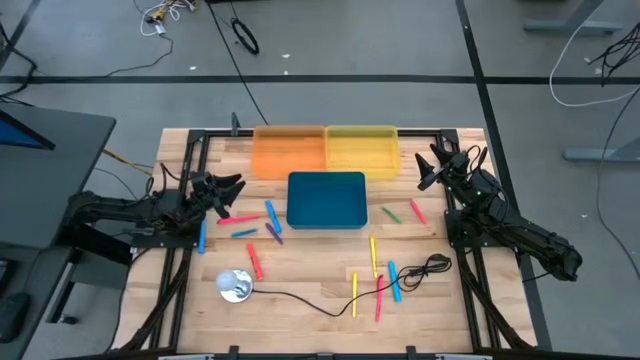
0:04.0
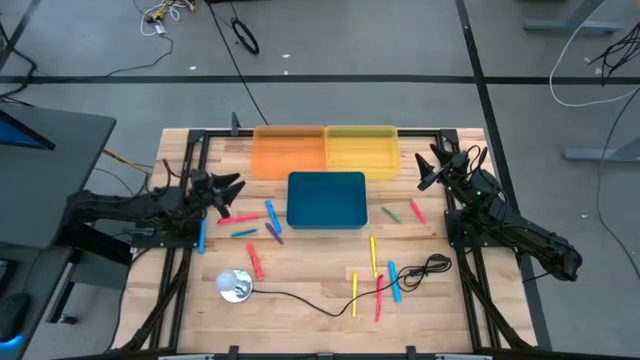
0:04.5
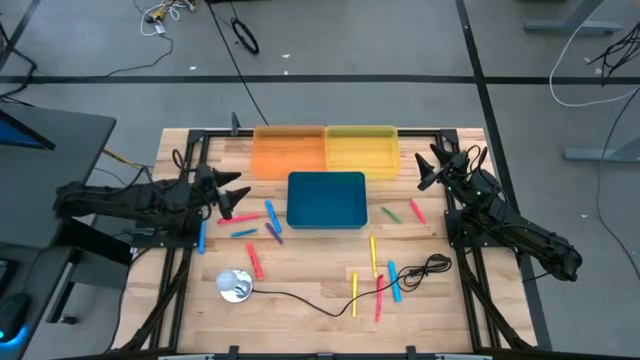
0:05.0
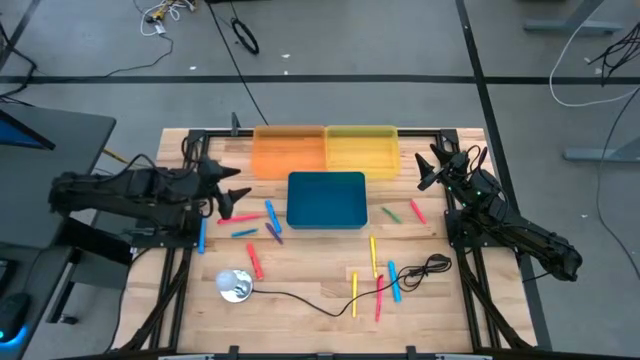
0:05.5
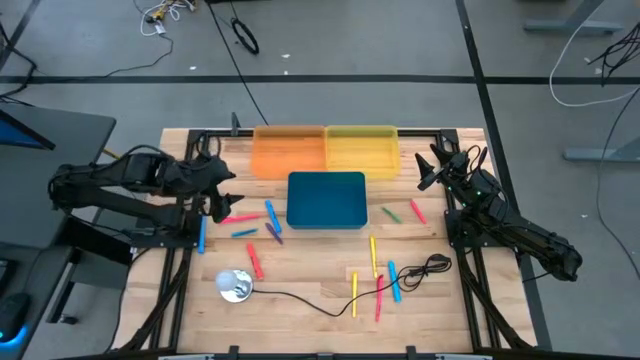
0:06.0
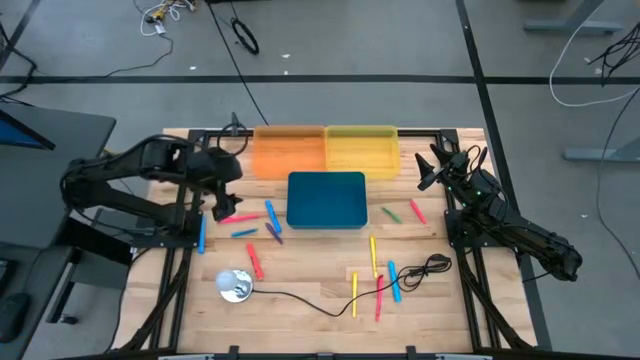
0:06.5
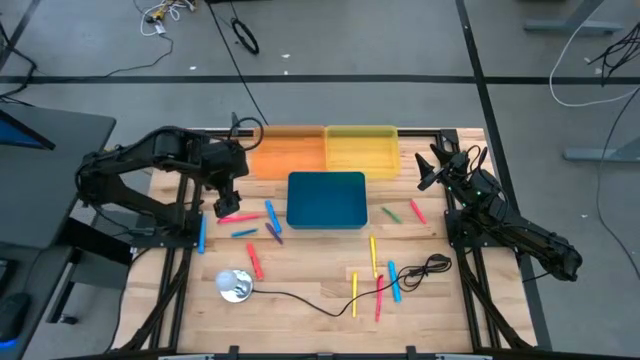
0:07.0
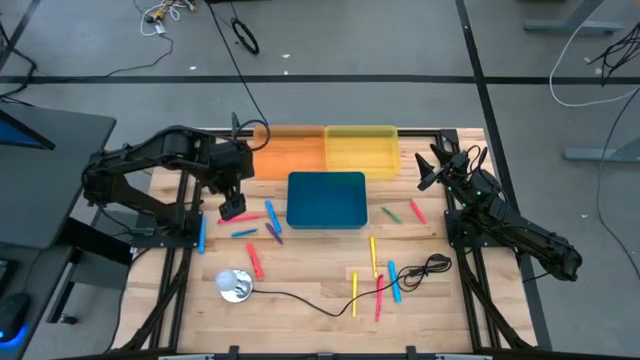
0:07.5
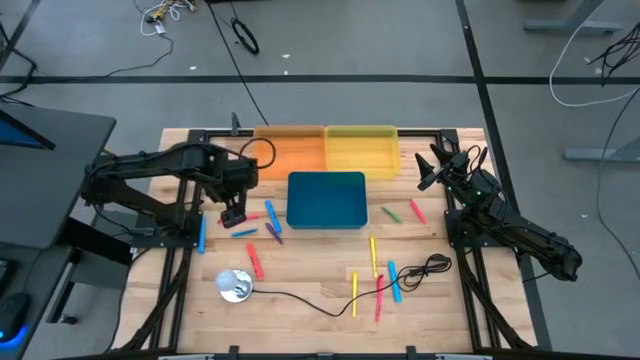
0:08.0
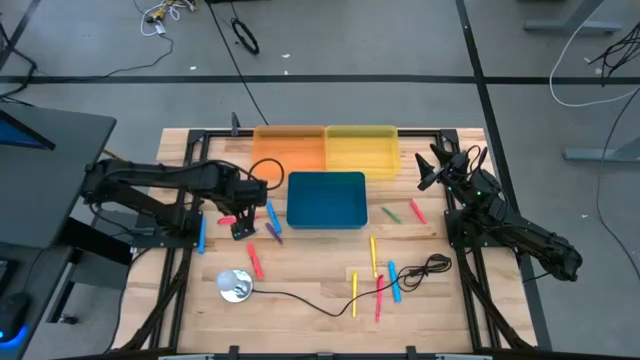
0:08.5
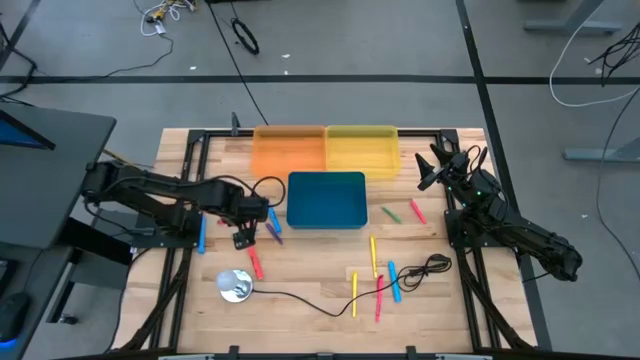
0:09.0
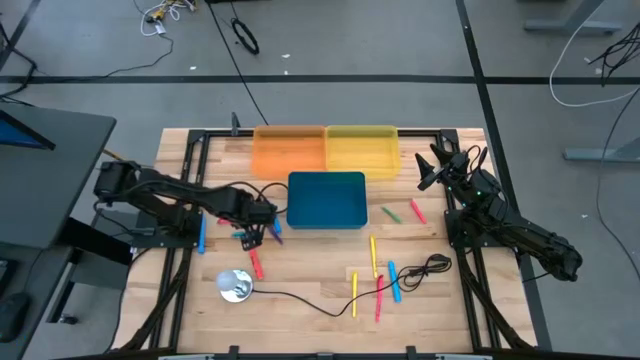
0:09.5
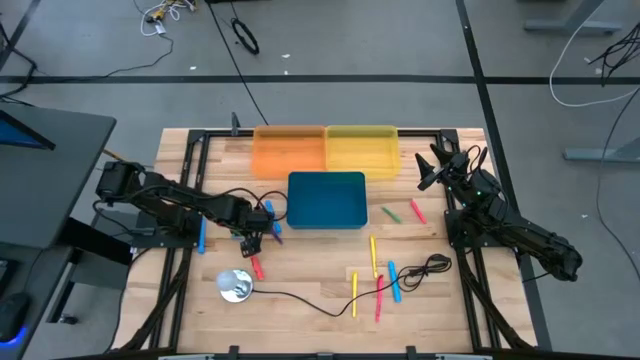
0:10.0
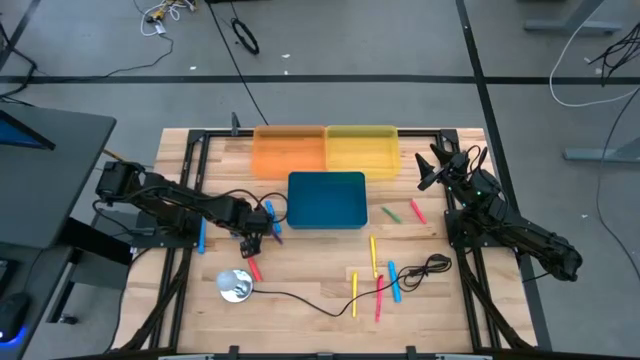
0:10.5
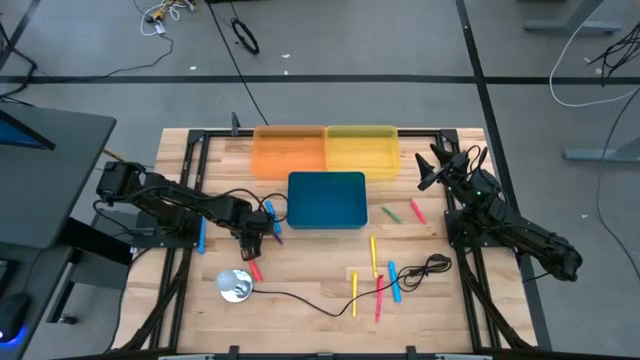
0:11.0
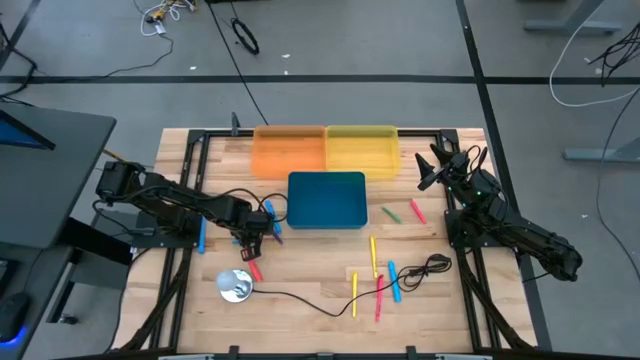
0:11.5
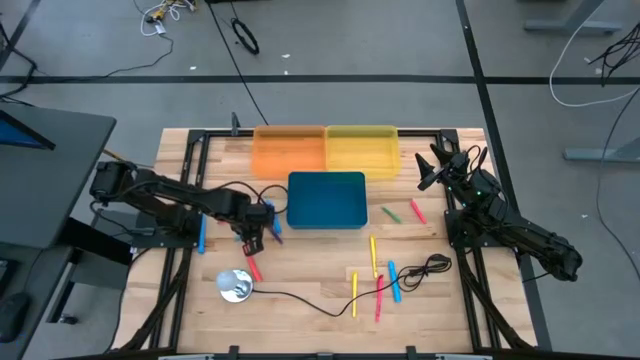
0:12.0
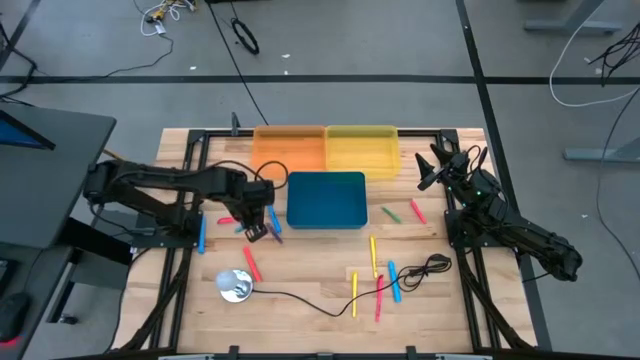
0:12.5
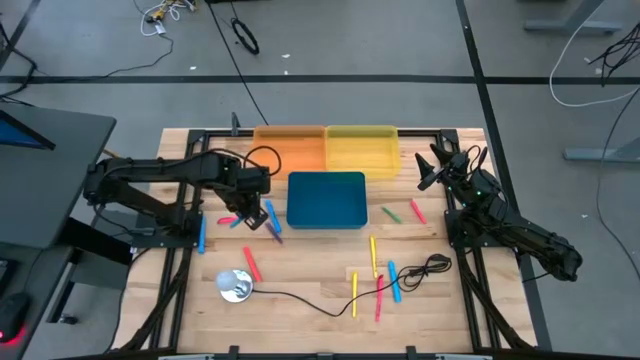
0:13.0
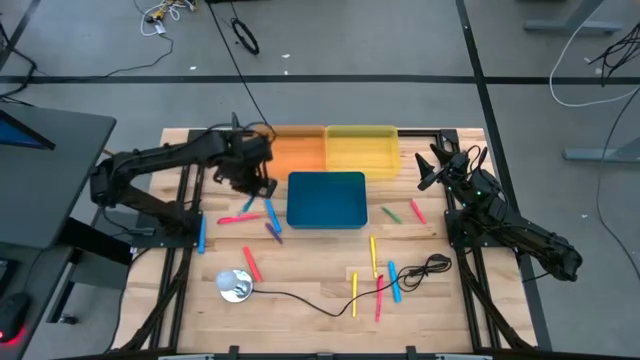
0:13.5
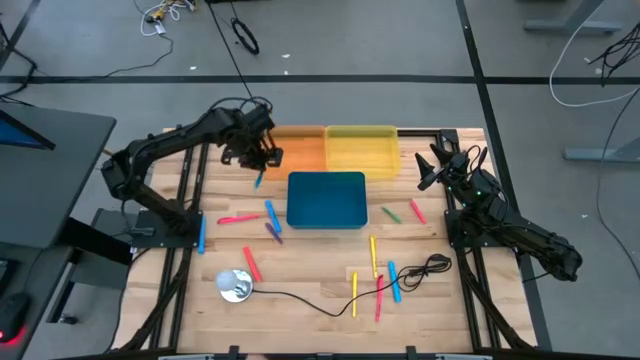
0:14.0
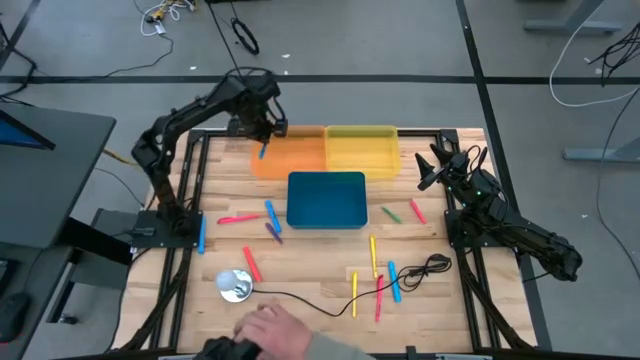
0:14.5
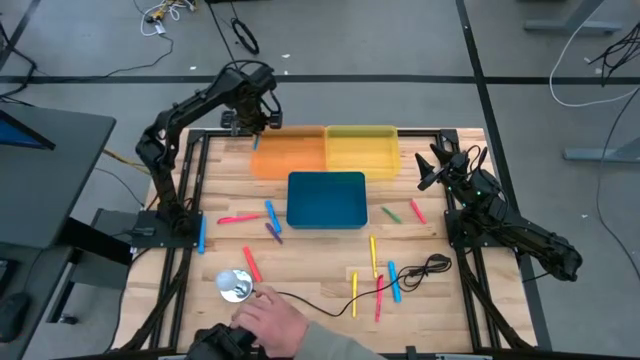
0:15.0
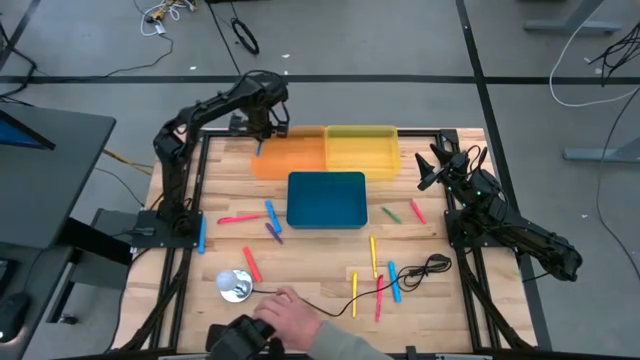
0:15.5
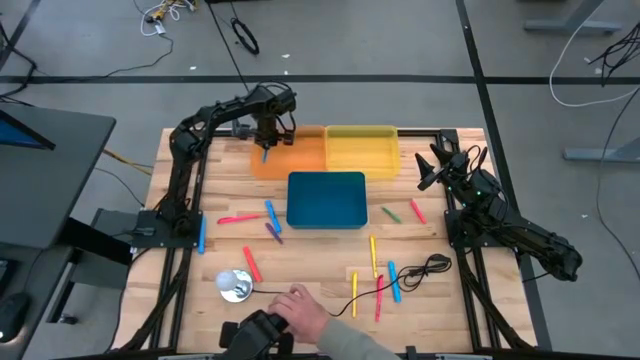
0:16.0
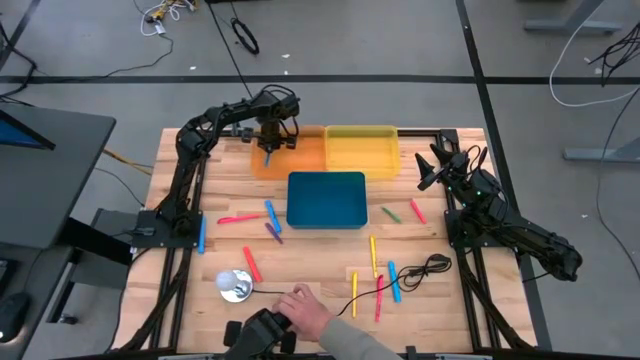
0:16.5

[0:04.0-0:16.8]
Task: Pick & Place Markers
Put the small blue highlighter into the orange transparent bin

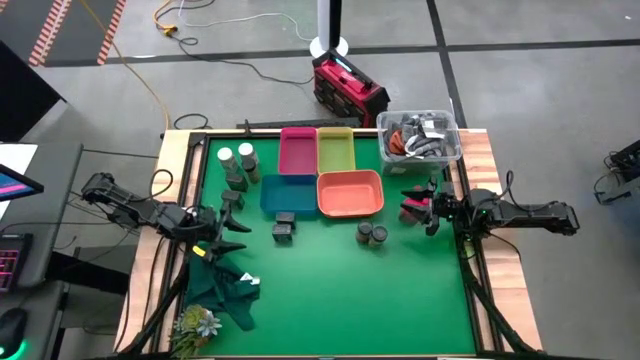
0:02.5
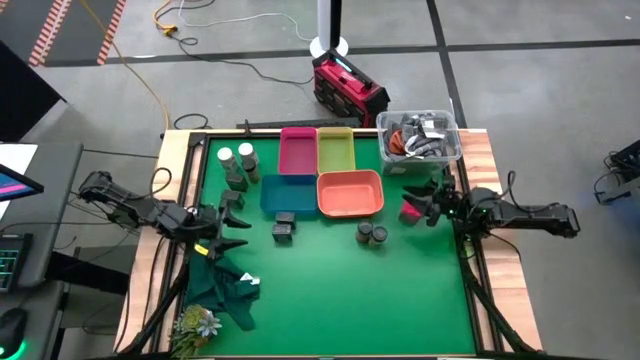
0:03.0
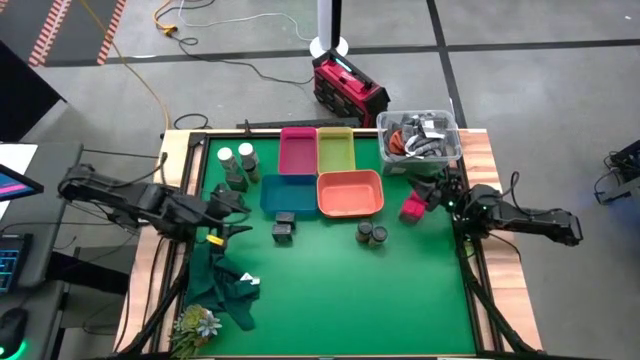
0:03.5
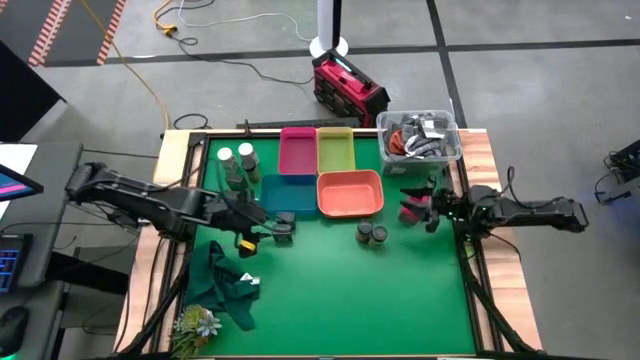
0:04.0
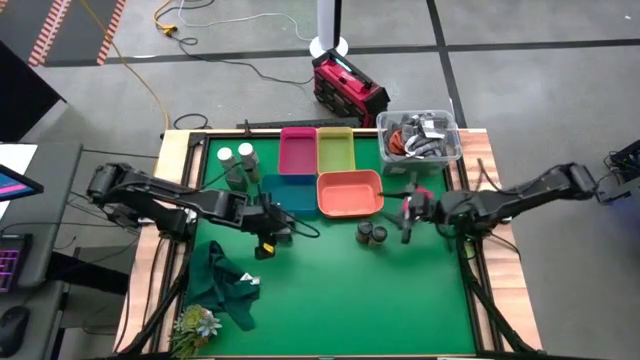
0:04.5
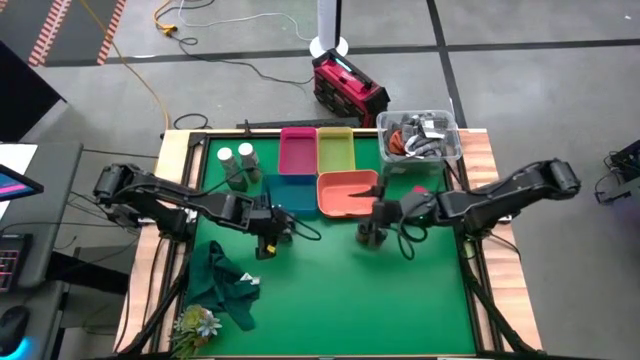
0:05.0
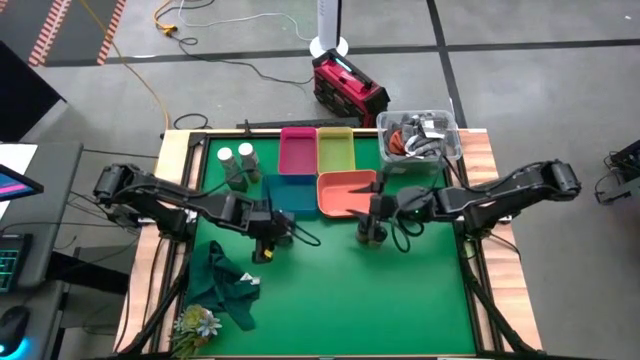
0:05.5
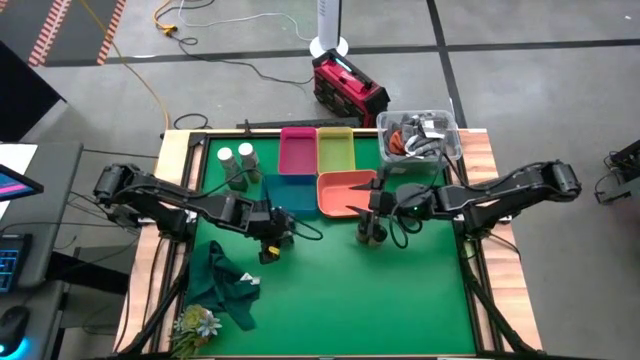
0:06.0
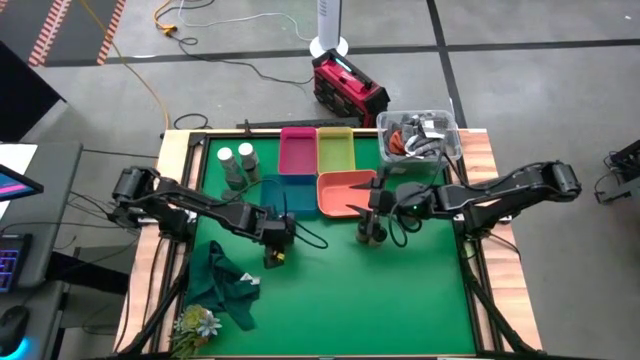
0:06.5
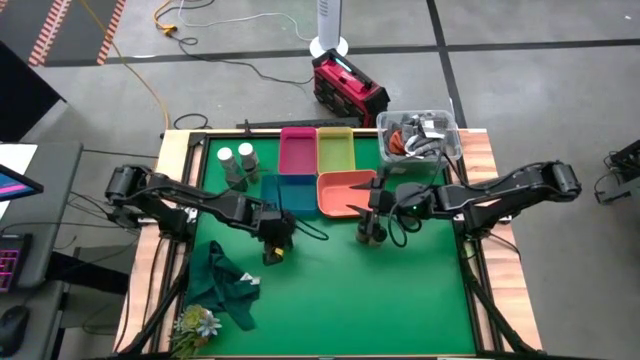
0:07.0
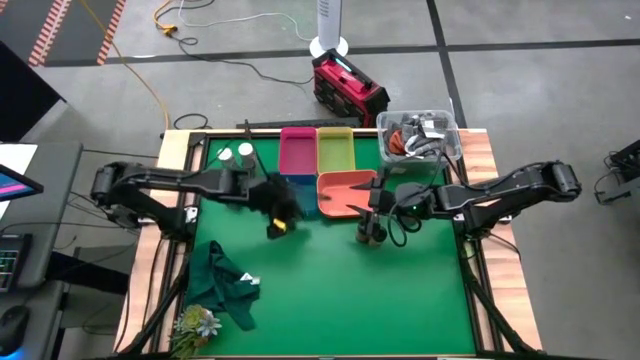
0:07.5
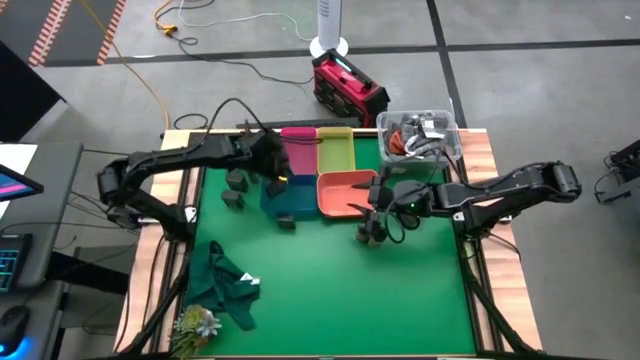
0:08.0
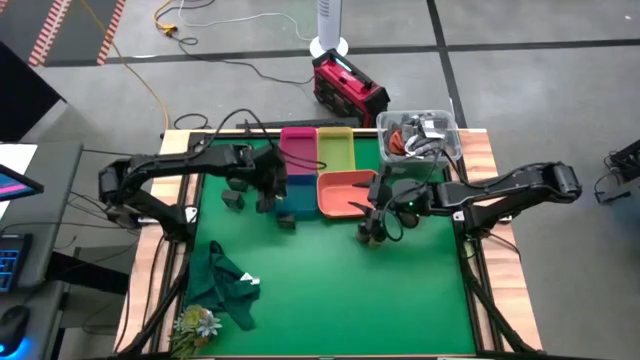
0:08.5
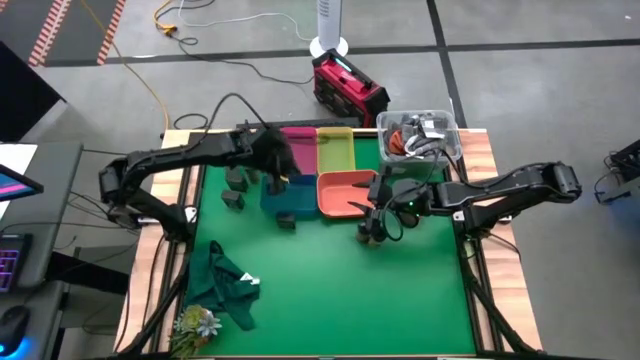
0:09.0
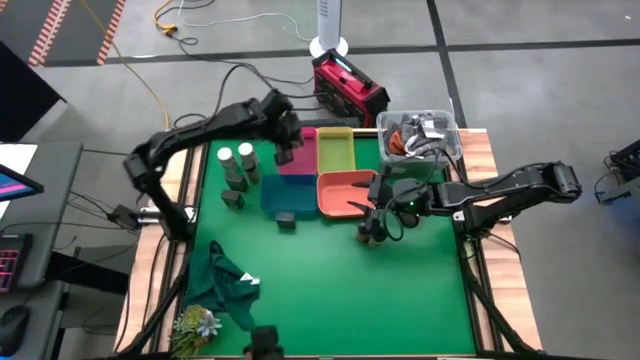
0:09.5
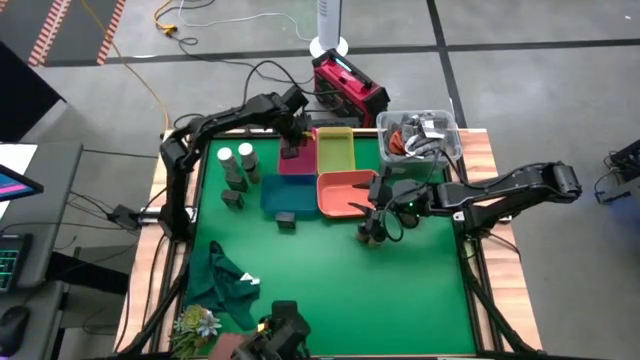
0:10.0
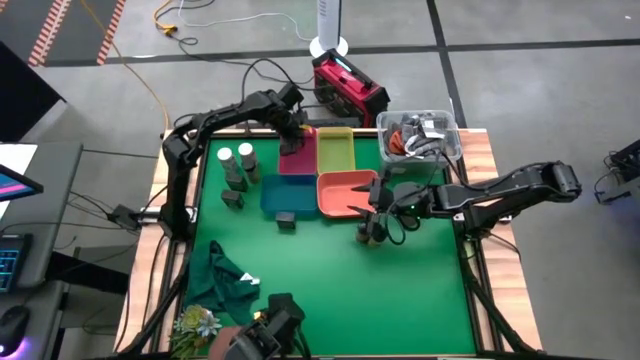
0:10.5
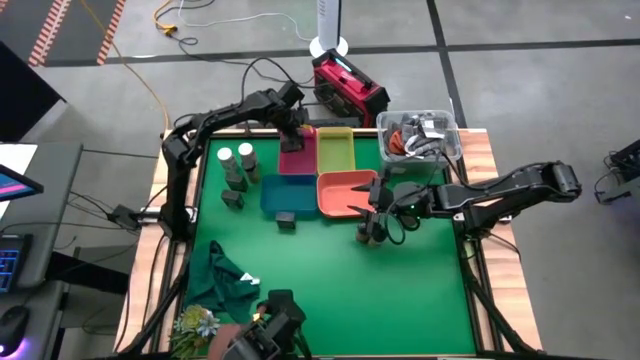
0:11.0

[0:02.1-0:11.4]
Task: Sort spices by type
Put the bottom black seasoning can into the red bin
